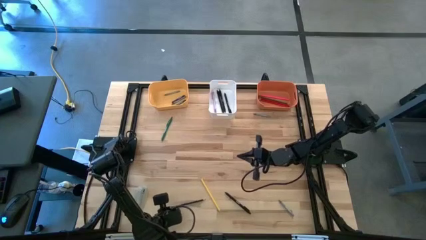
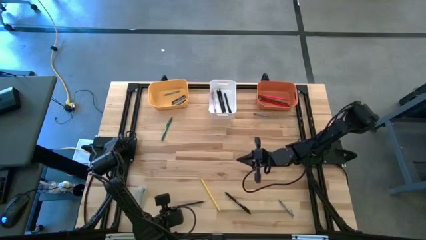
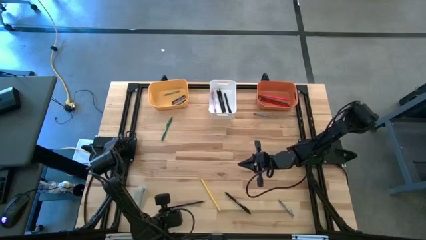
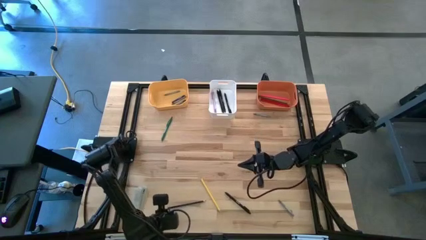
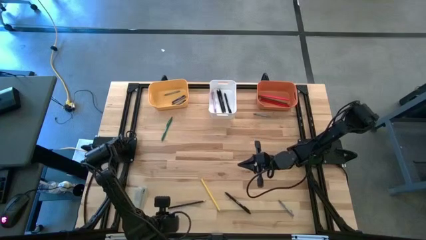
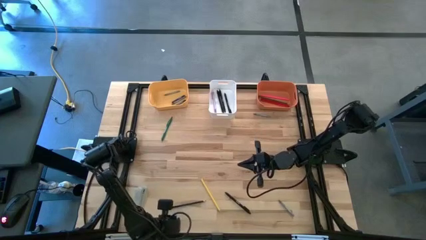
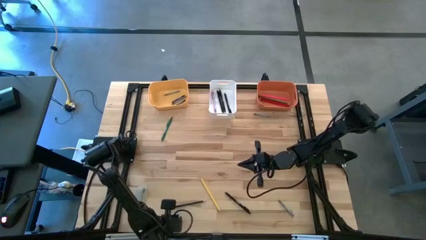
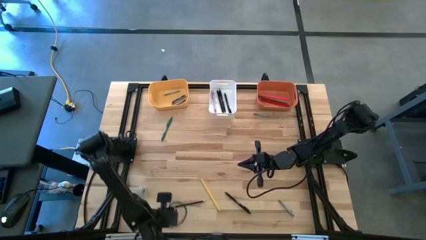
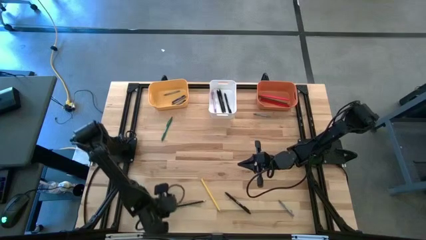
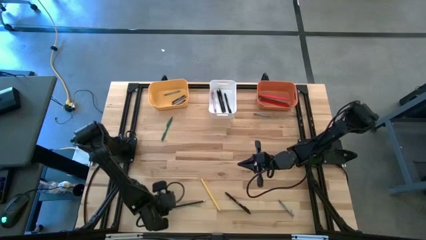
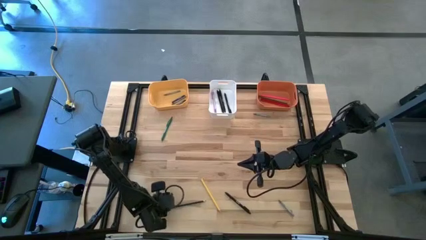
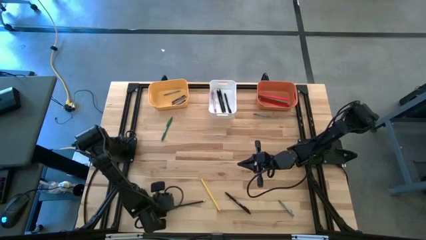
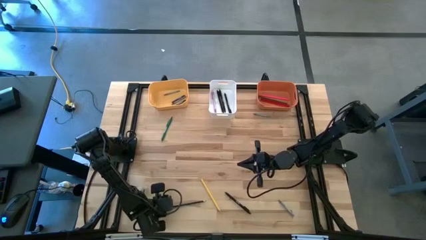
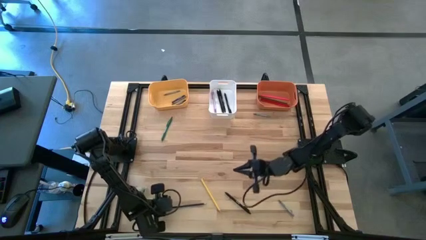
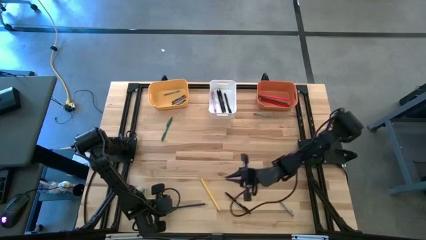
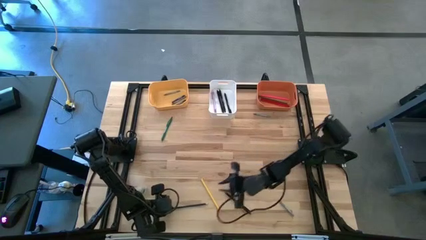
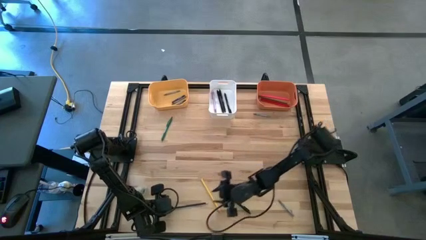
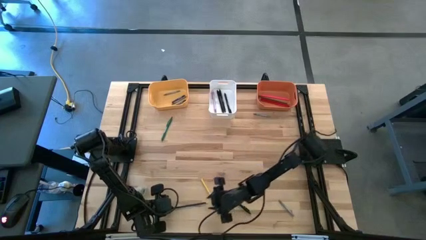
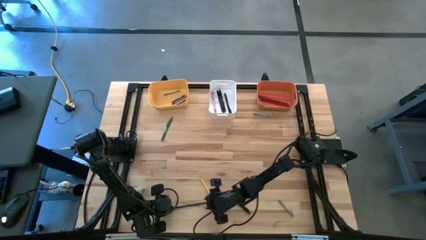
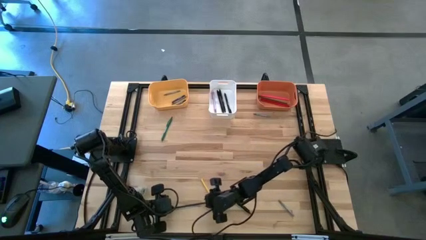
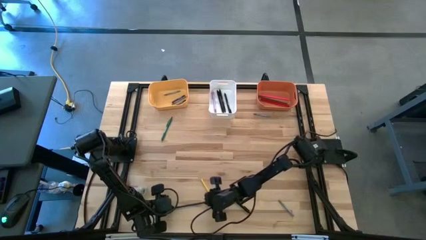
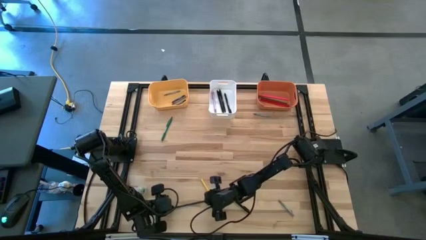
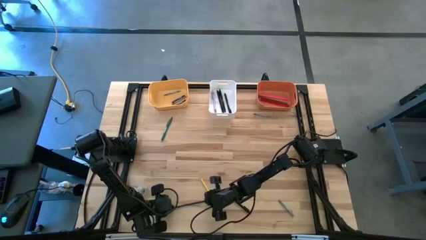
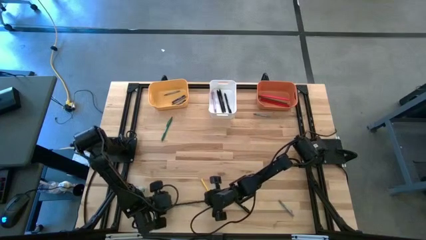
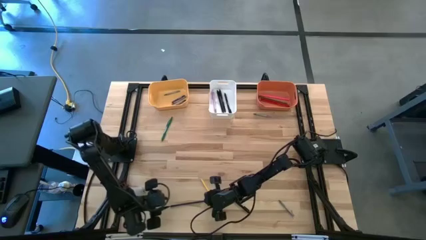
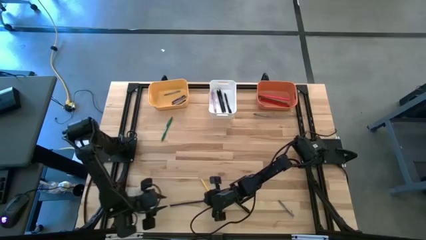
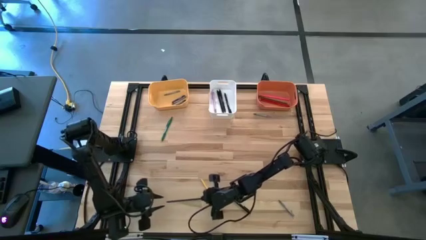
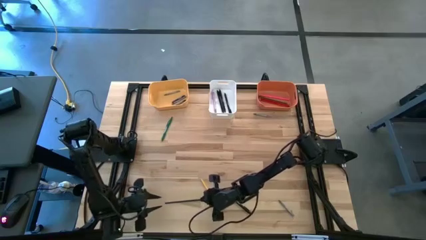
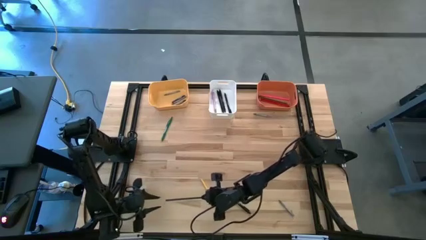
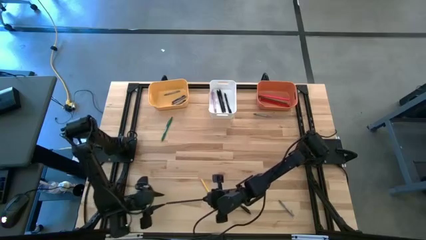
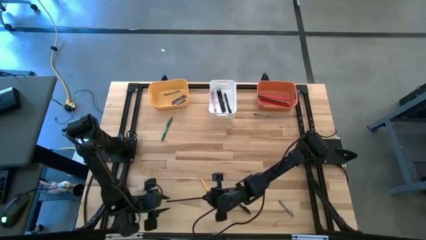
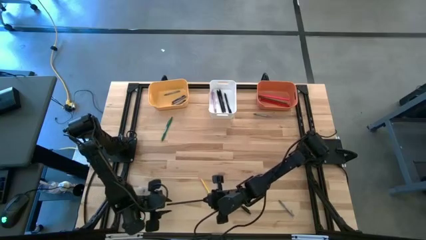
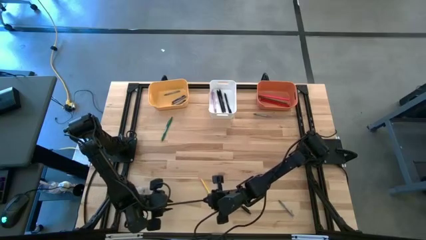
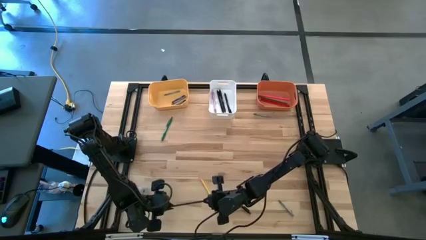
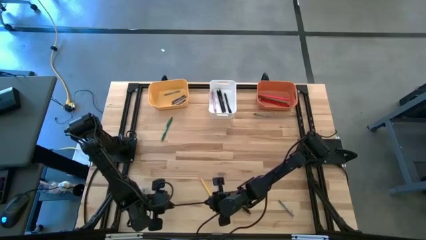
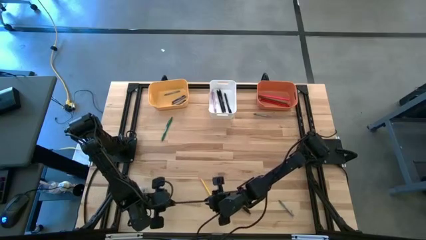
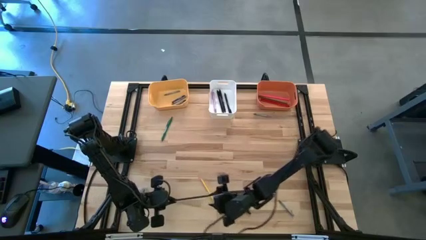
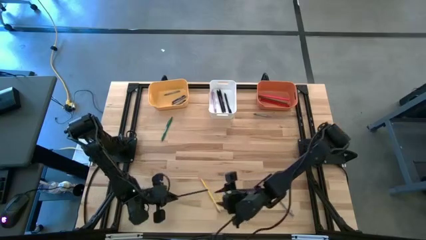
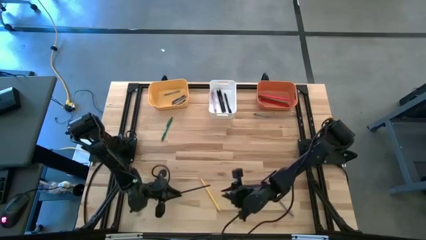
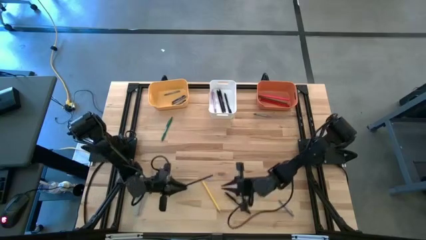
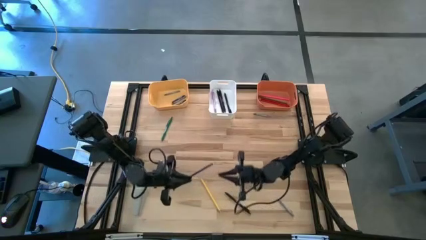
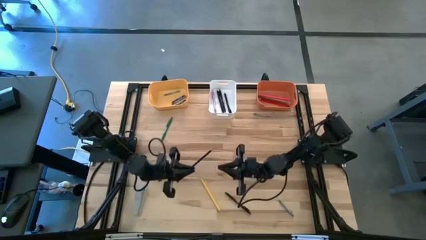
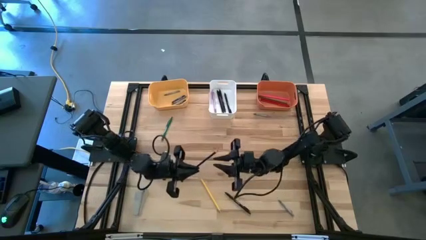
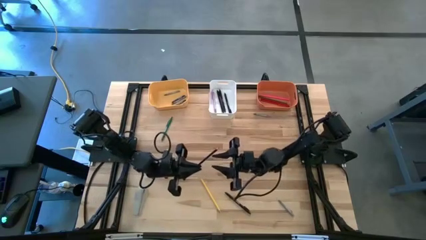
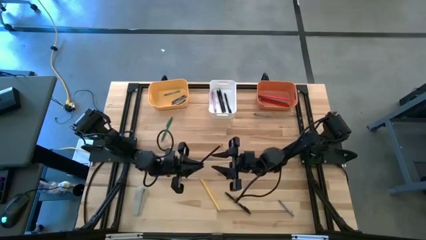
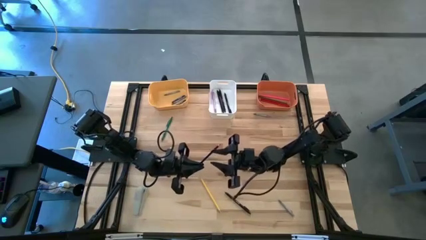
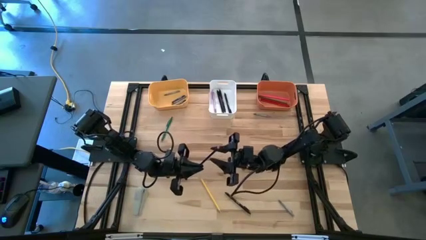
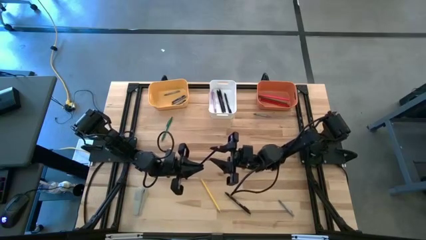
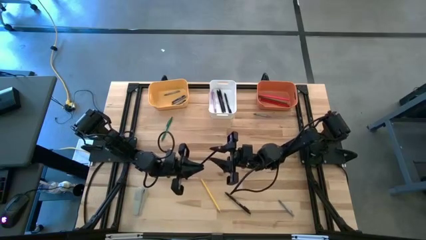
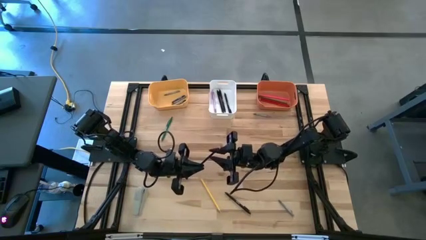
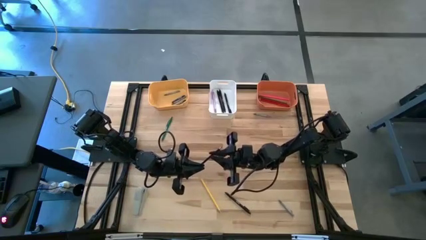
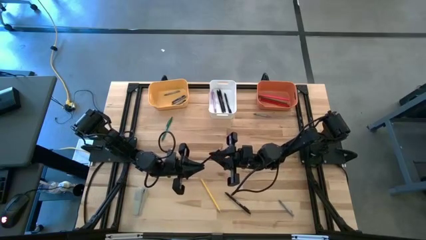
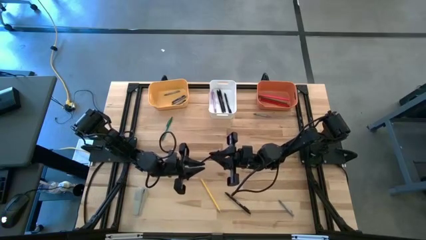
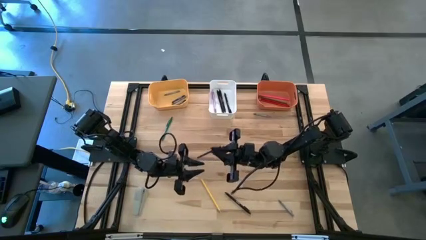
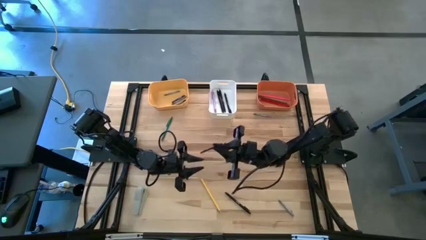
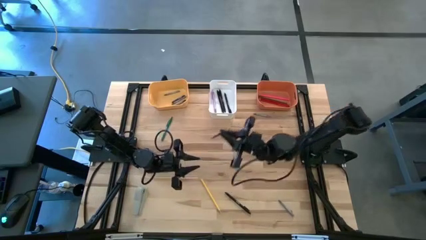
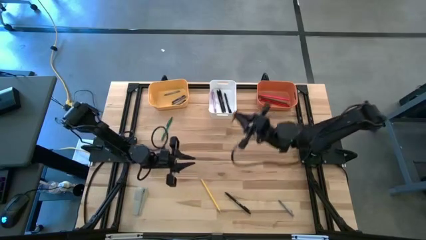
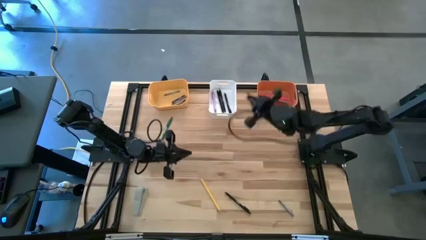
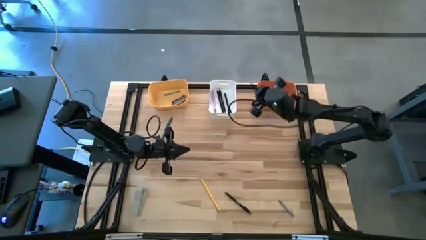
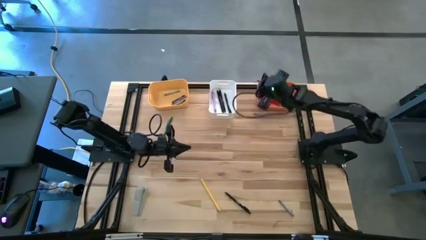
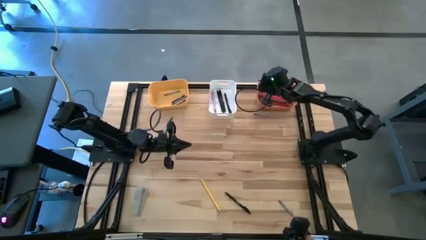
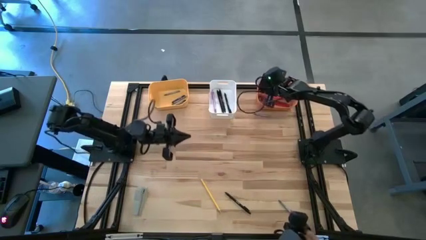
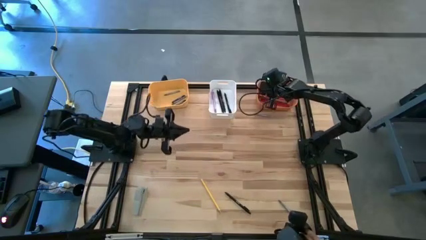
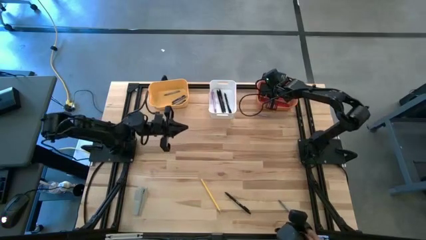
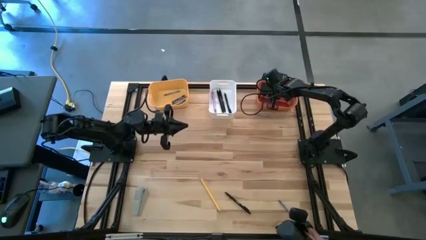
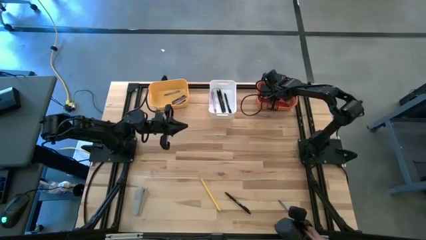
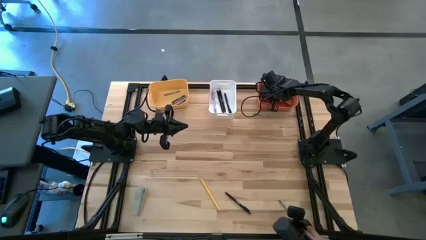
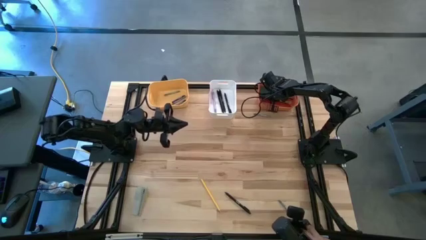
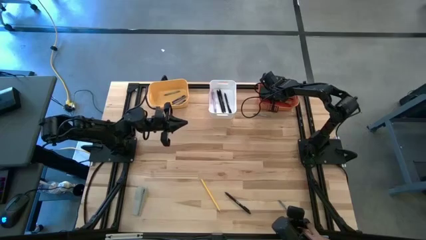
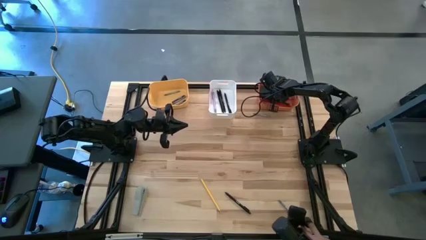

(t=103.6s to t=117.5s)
Task: Sort crayons/erasers/pens/pencils in bins
Put the blue pencil into the orange bin
